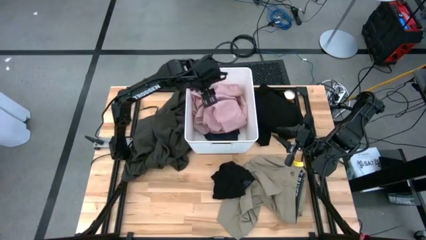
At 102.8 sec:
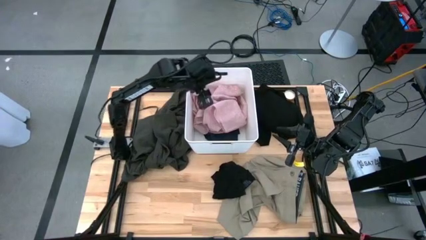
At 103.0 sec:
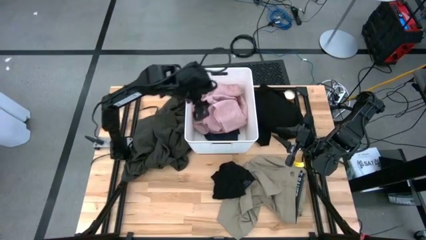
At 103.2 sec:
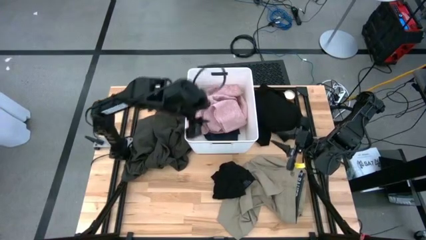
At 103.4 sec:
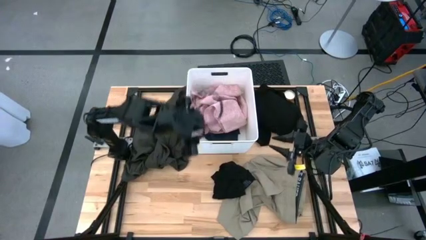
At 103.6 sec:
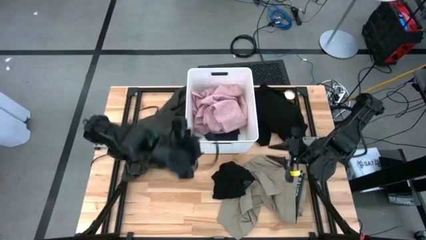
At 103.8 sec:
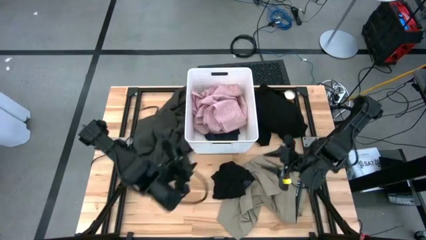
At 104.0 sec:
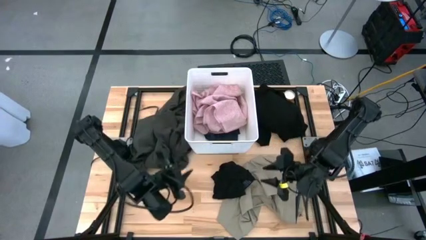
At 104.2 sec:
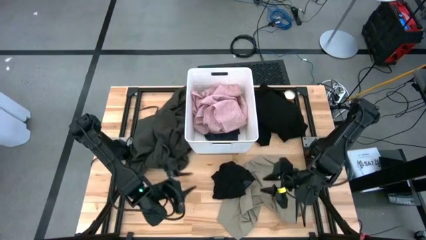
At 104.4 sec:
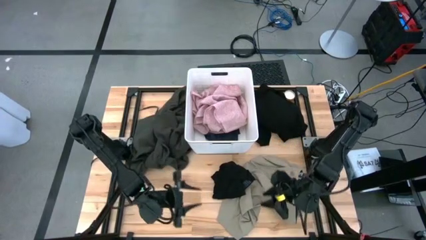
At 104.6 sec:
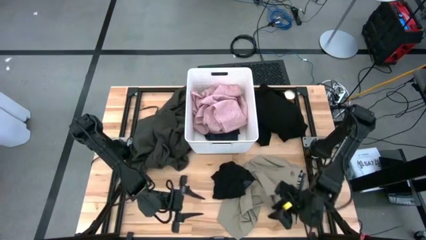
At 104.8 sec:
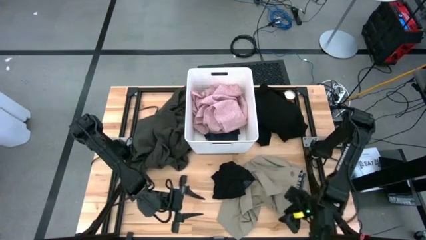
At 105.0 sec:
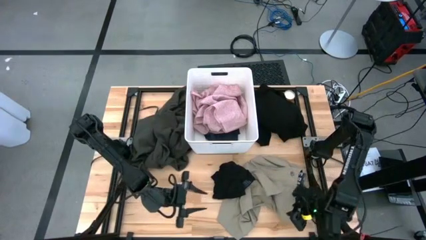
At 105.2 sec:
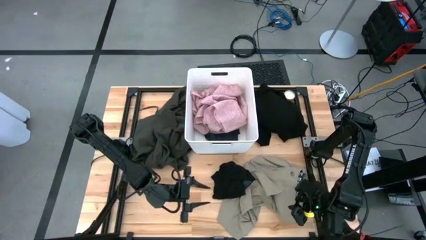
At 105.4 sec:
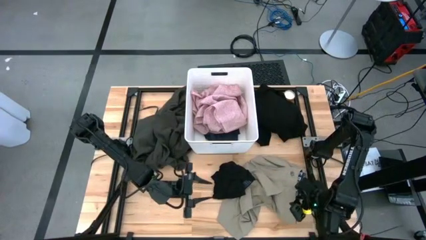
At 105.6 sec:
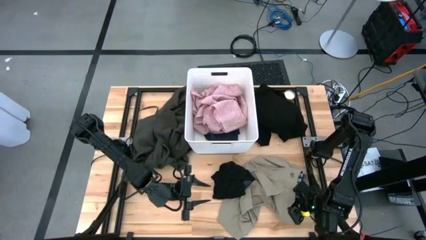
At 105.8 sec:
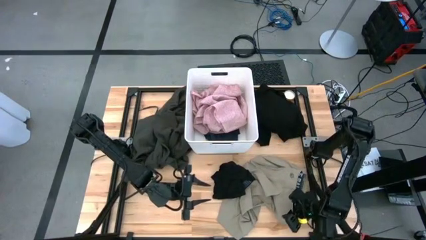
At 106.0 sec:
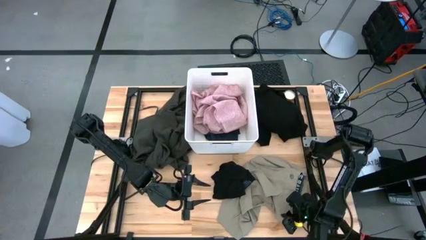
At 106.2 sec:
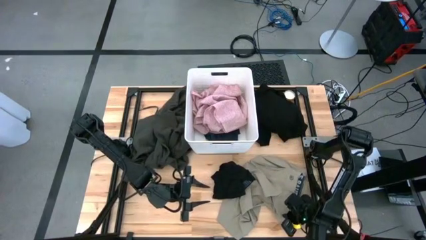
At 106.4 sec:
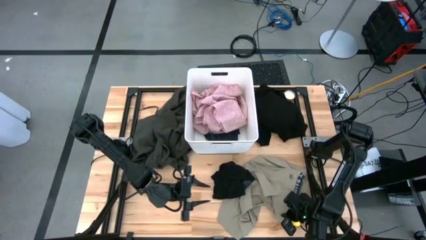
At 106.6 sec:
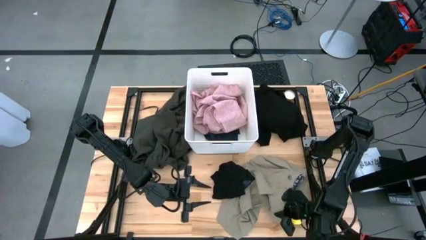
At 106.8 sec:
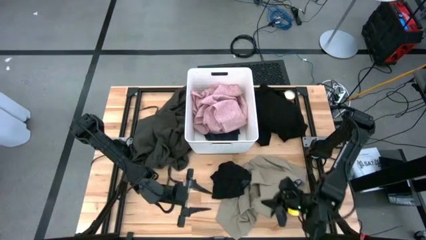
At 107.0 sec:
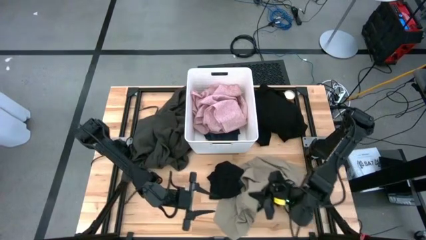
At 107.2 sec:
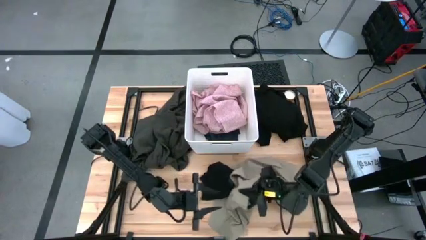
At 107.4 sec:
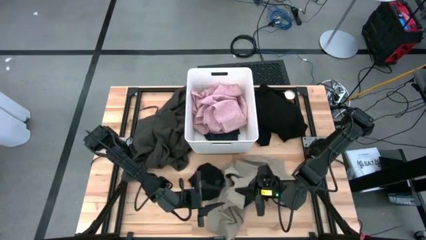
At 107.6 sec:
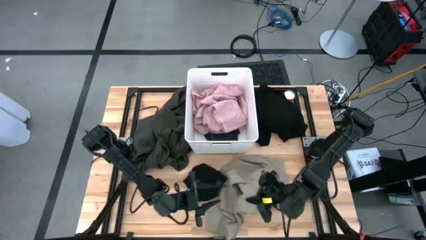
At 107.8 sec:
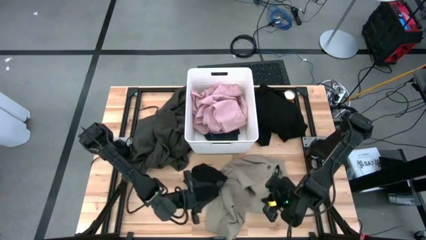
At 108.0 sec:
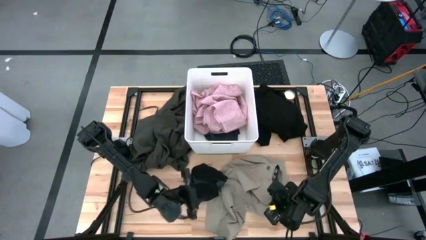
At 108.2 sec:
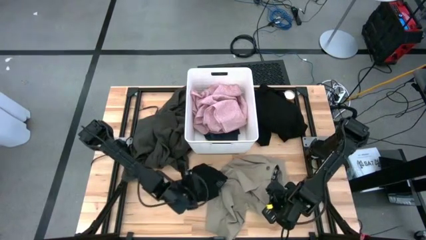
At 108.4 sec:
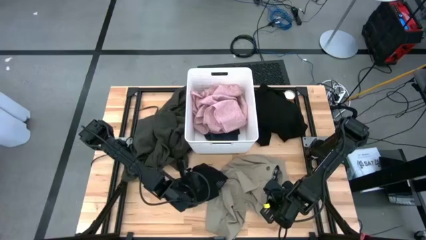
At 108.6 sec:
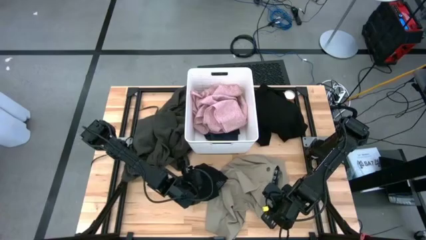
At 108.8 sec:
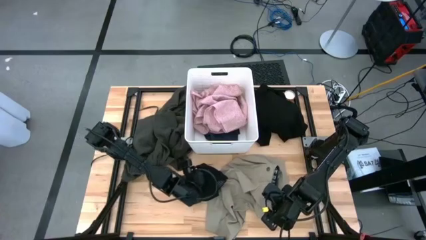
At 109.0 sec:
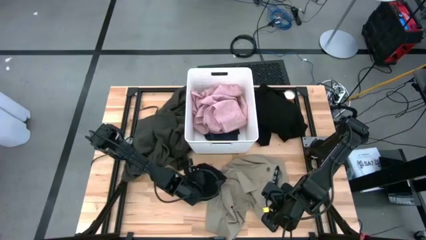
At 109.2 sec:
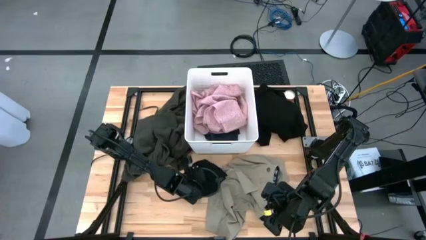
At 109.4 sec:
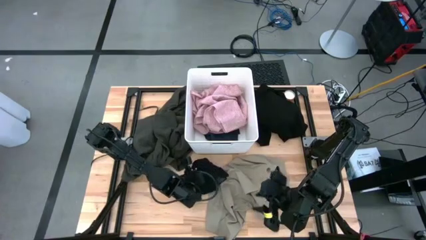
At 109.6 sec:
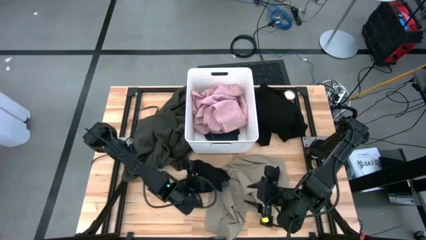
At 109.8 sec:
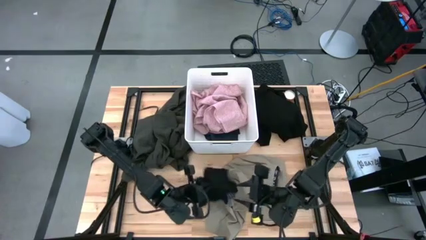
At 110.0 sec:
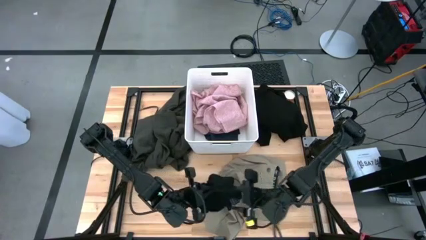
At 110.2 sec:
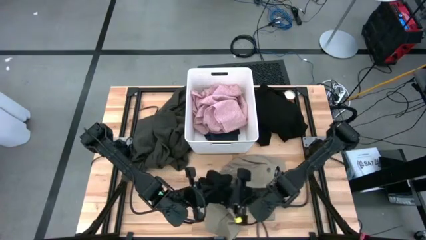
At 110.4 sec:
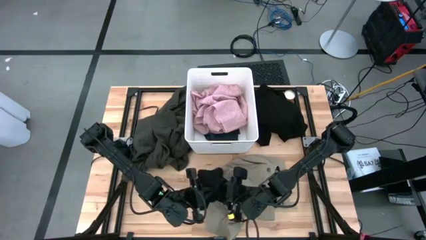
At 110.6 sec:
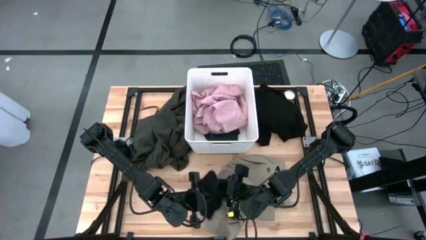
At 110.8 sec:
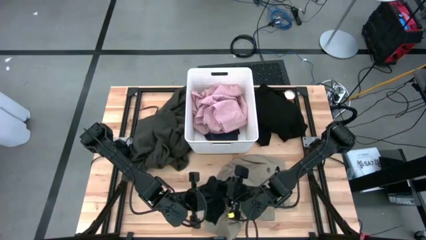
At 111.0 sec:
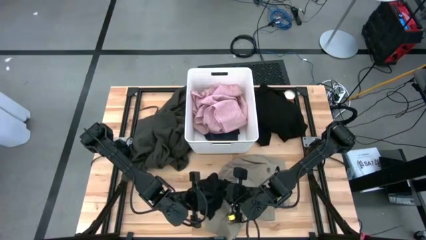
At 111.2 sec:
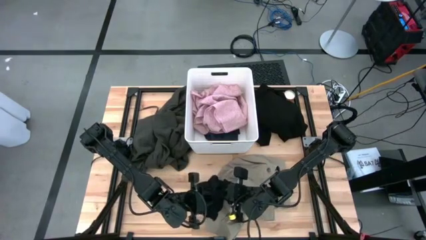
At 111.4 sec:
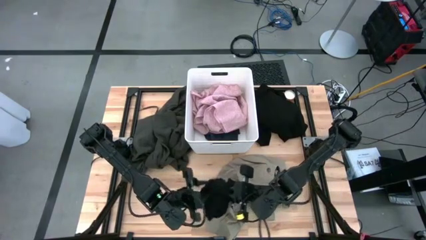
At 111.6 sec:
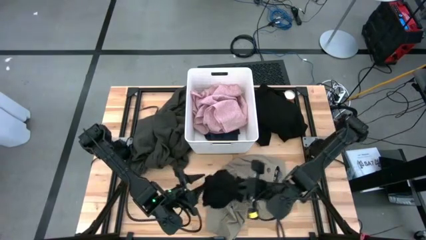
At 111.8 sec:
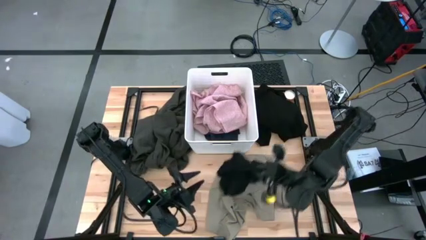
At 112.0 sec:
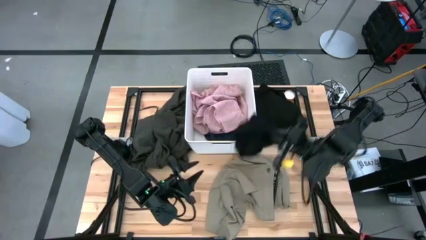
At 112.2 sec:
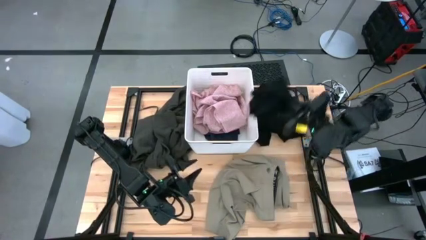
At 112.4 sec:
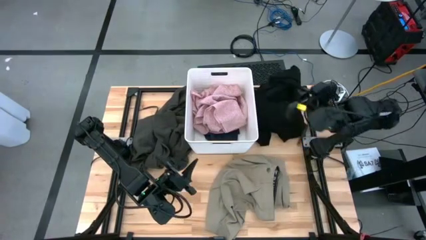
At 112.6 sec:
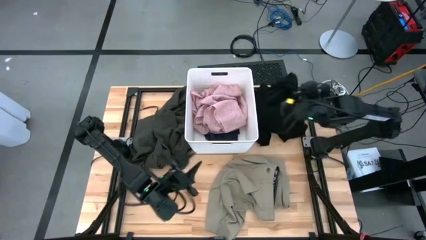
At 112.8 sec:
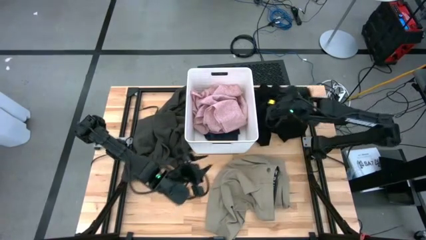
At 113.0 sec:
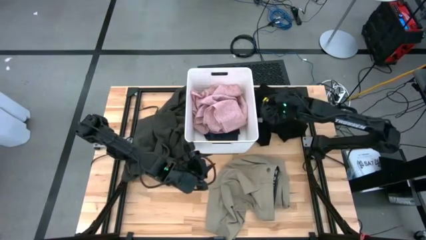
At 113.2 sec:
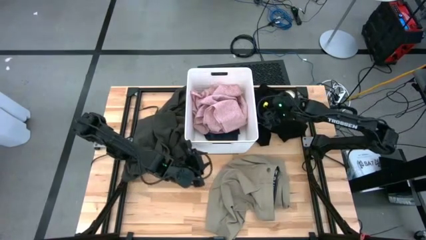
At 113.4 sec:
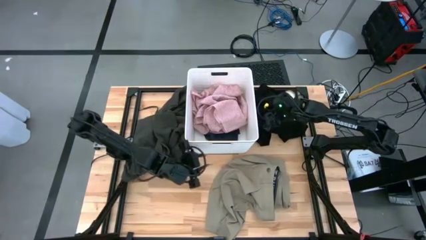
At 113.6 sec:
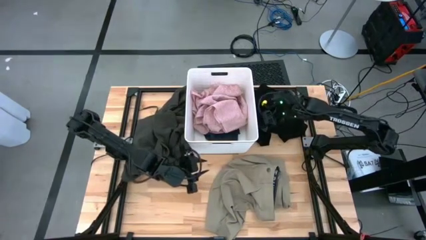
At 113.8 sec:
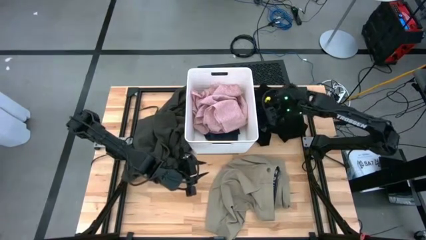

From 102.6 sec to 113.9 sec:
Task: Sort clothes
Move the black boxer to the top right of the table

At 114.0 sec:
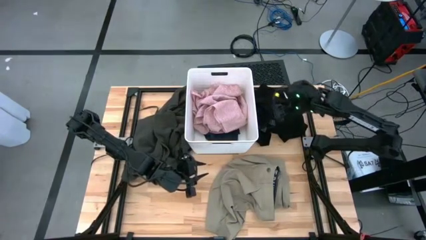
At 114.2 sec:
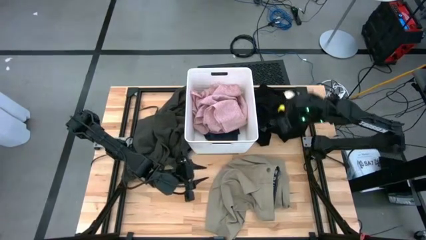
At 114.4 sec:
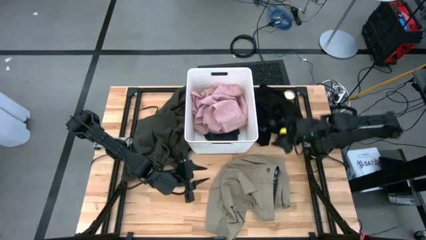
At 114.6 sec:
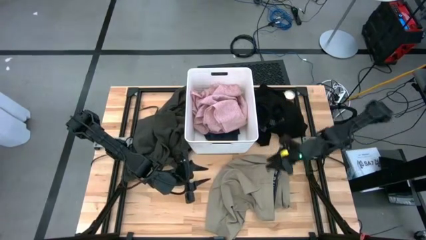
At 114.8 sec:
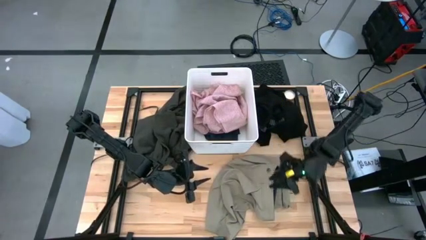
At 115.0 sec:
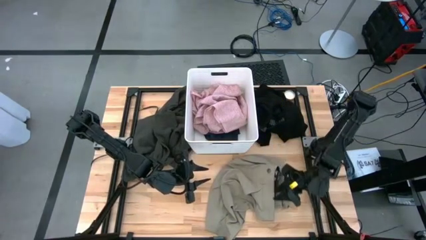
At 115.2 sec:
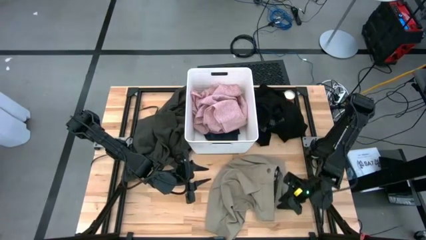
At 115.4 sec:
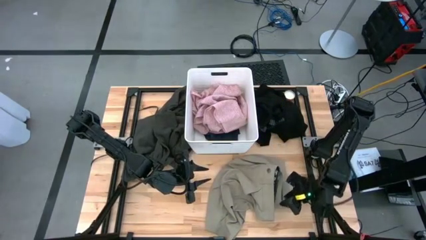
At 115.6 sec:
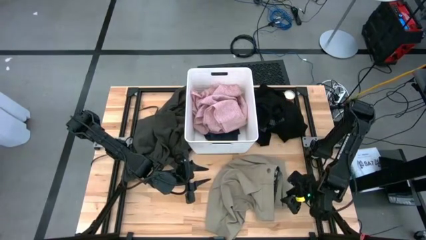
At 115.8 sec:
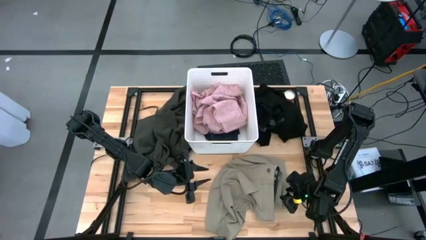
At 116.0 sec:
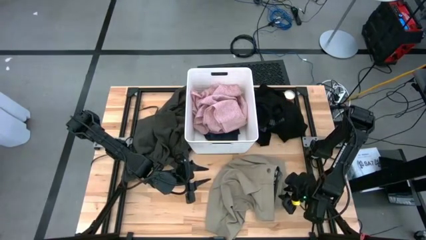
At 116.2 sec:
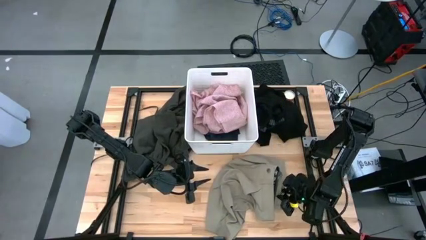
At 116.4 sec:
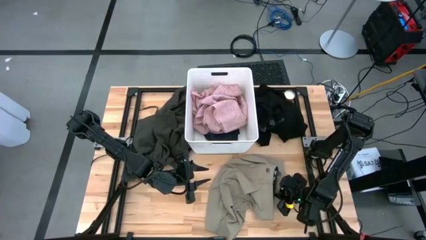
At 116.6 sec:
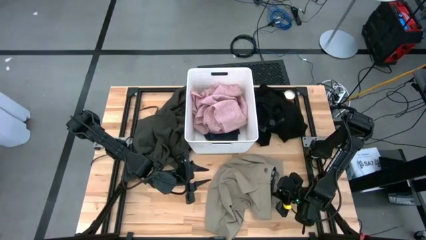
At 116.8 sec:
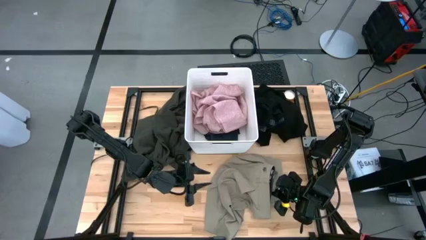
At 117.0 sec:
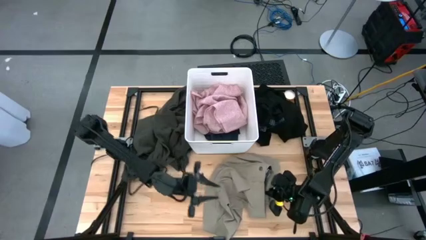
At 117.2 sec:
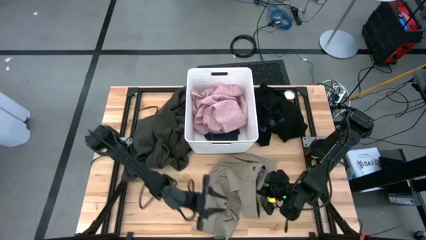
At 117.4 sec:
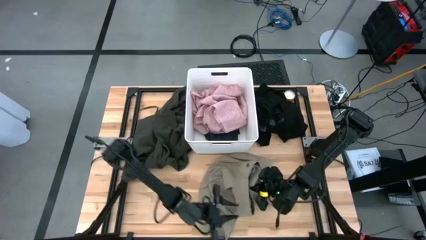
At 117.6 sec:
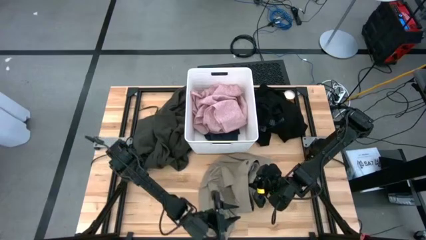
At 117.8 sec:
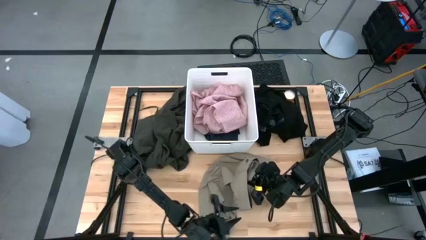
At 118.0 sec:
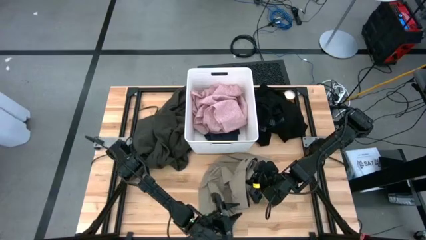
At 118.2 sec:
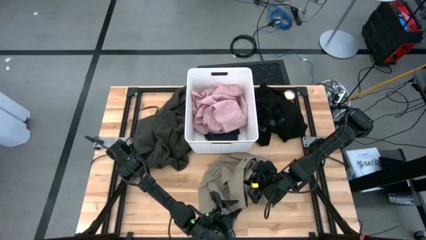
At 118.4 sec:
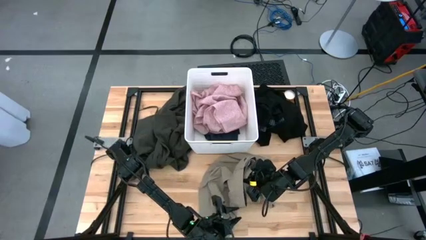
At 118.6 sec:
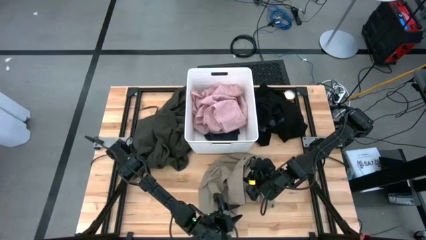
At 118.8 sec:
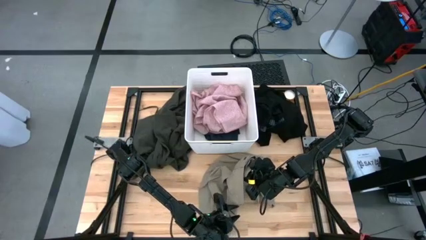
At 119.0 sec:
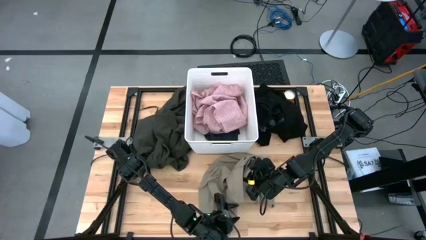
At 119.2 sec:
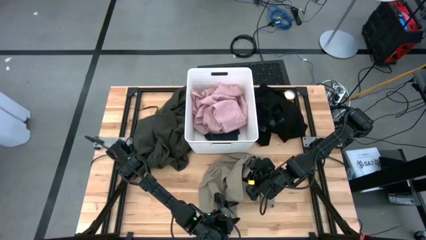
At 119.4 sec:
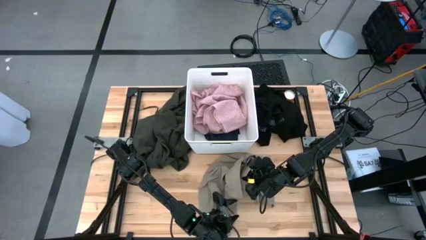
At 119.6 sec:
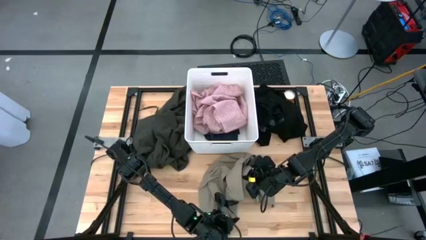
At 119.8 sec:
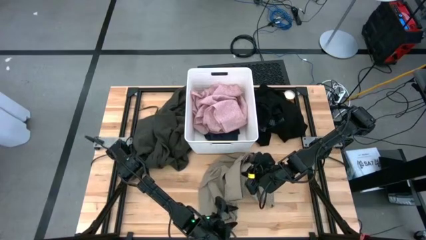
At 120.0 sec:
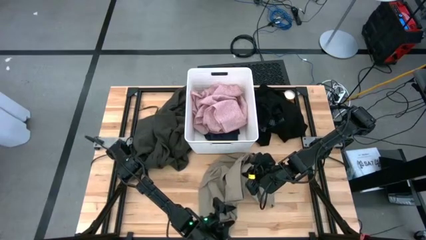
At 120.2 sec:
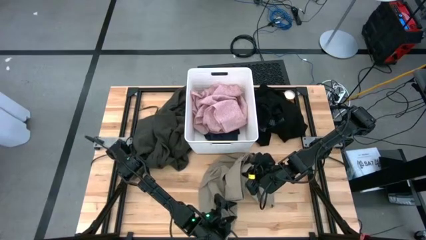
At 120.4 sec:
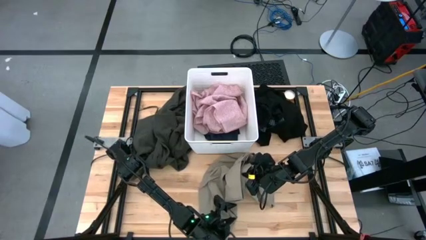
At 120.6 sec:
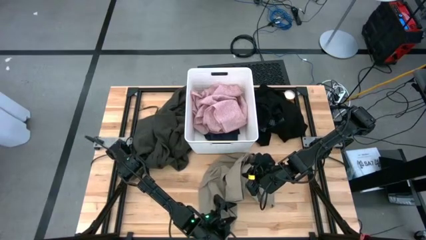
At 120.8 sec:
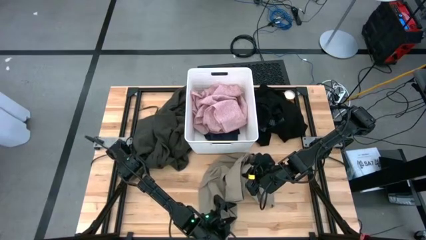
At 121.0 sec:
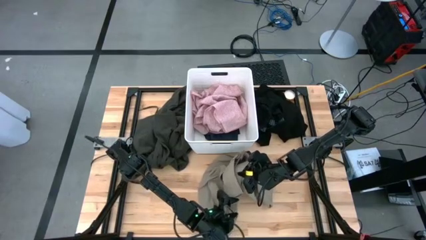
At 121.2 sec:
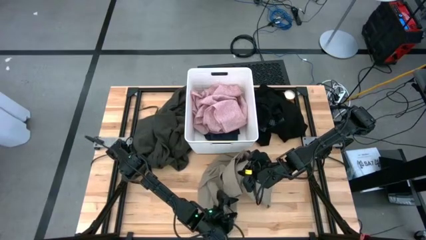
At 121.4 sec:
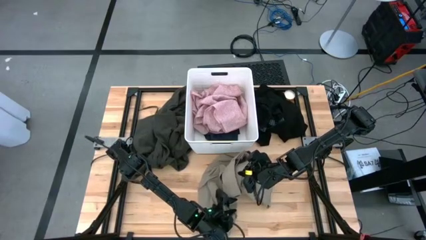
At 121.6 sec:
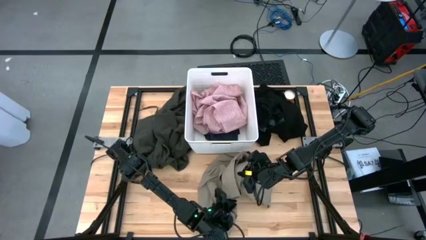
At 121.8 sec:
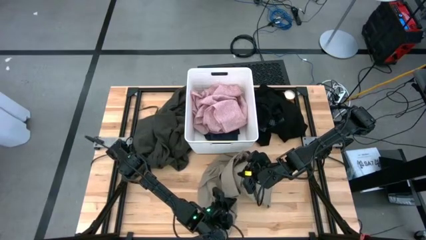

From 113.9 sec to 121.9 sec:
Put the brown shorts into the white laundry bin
